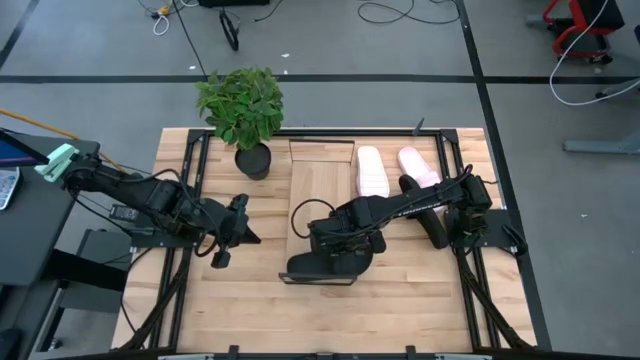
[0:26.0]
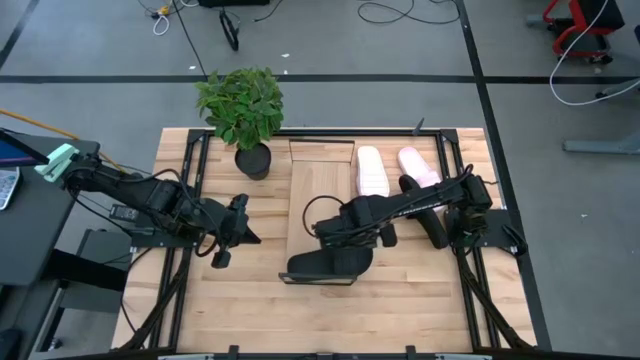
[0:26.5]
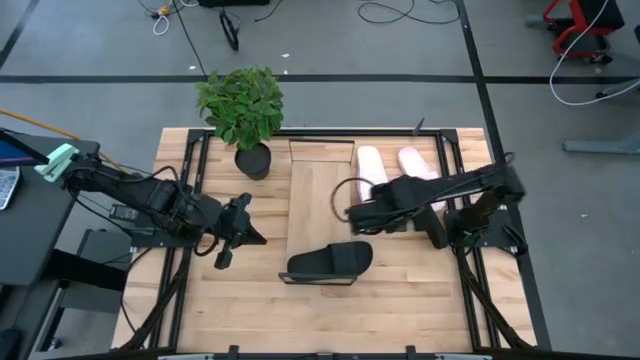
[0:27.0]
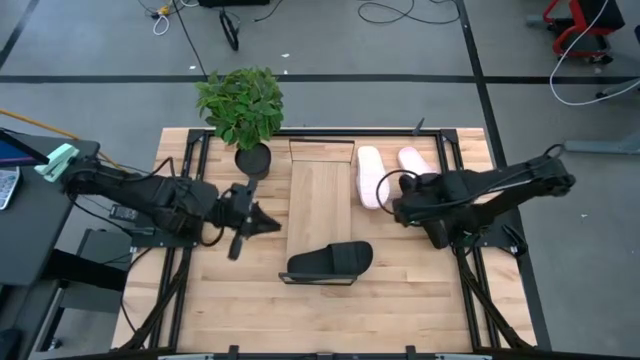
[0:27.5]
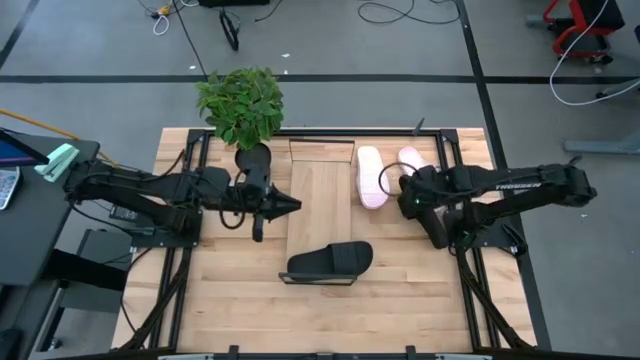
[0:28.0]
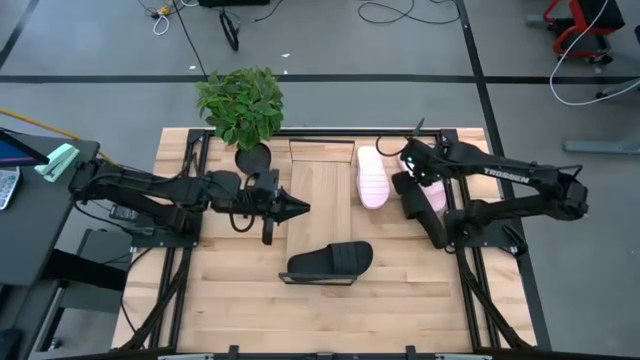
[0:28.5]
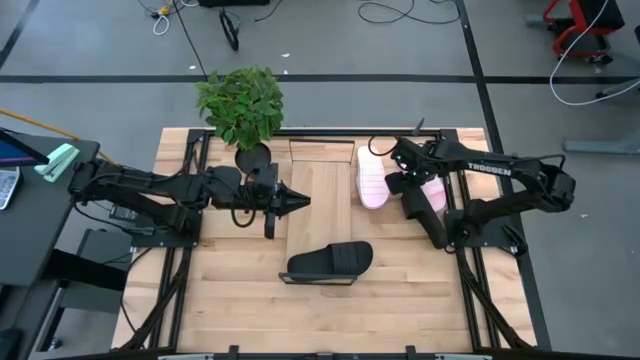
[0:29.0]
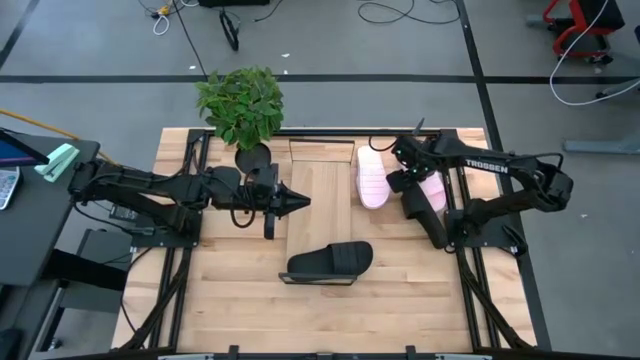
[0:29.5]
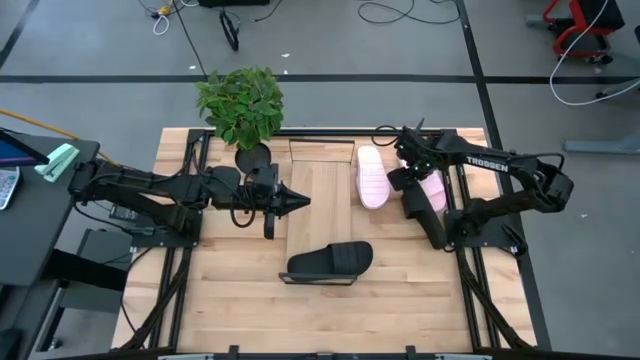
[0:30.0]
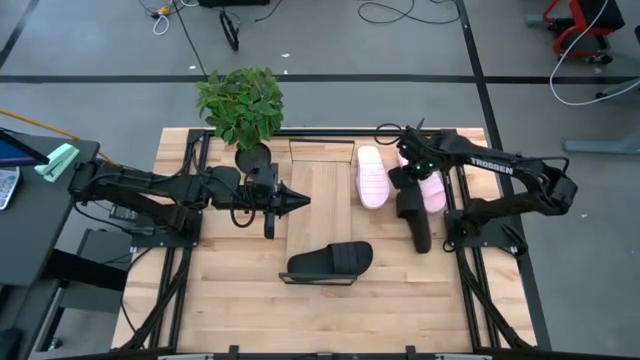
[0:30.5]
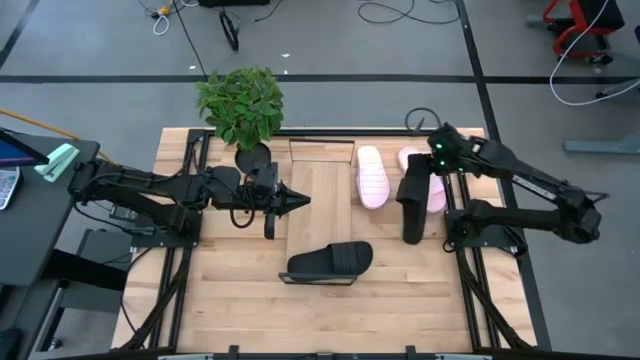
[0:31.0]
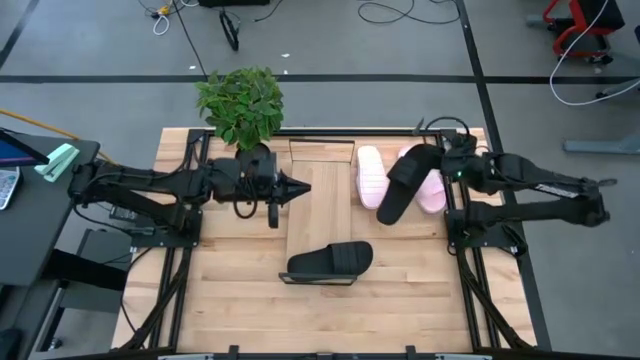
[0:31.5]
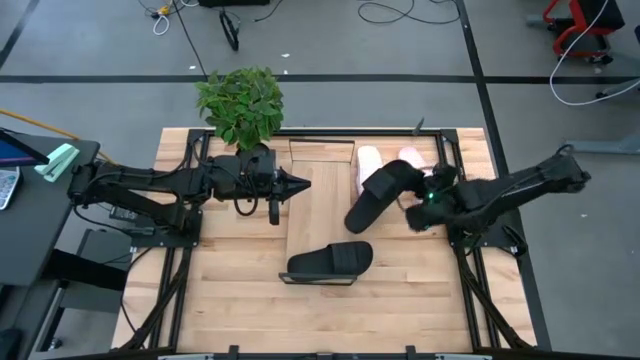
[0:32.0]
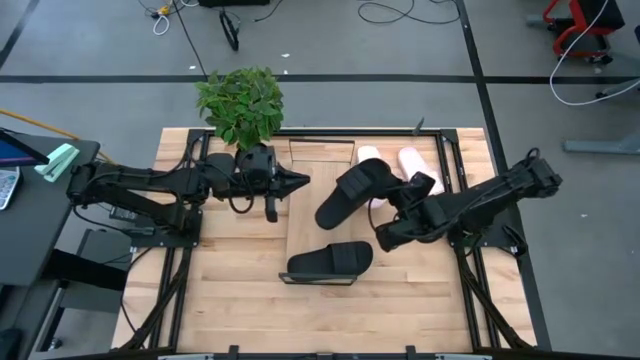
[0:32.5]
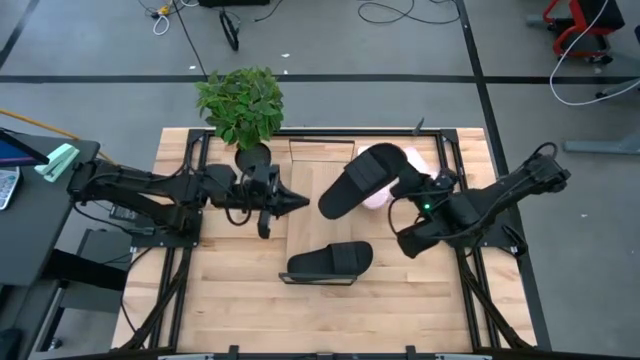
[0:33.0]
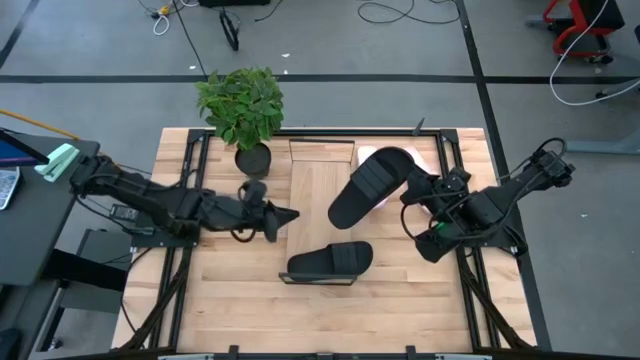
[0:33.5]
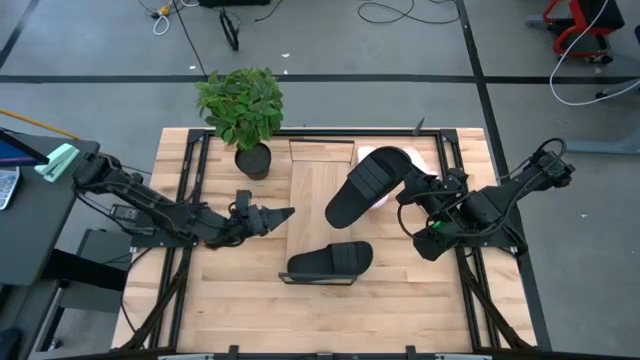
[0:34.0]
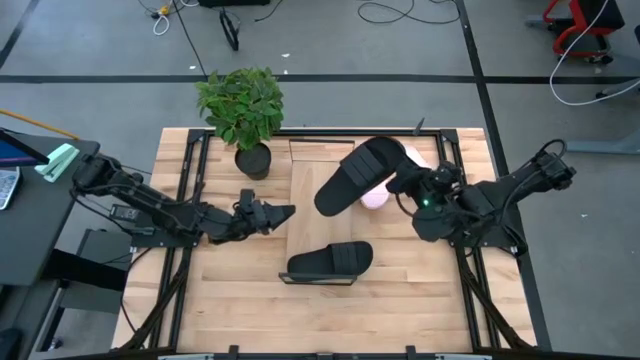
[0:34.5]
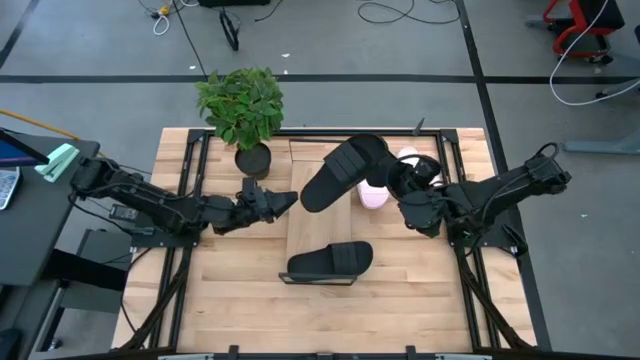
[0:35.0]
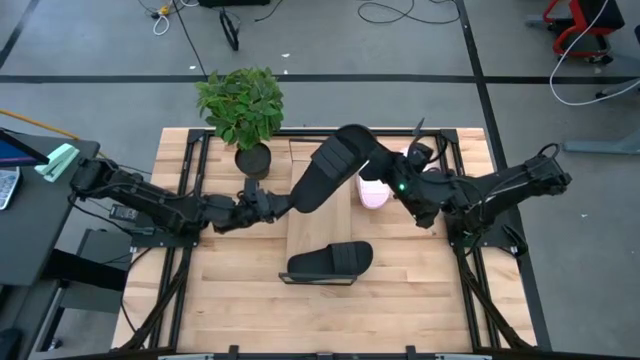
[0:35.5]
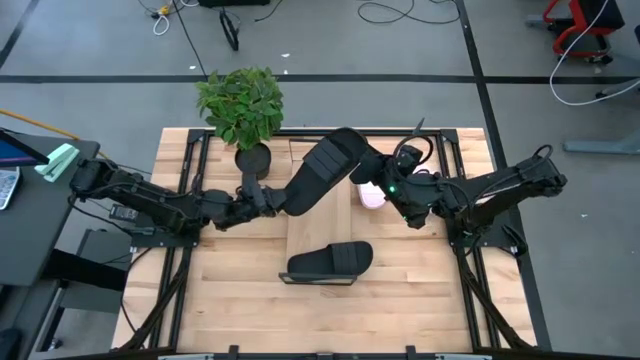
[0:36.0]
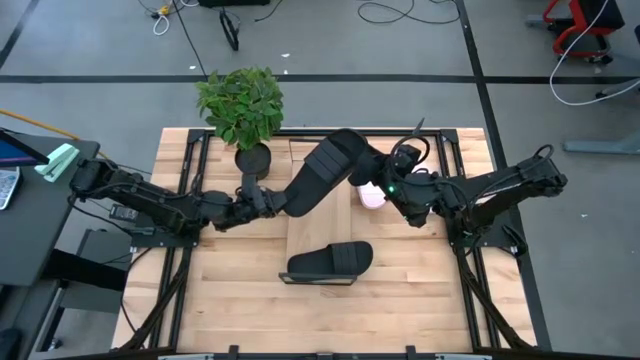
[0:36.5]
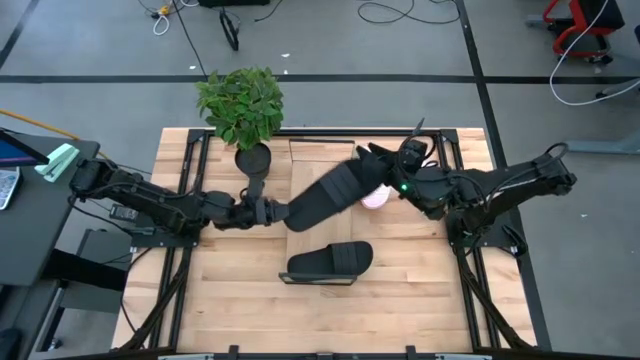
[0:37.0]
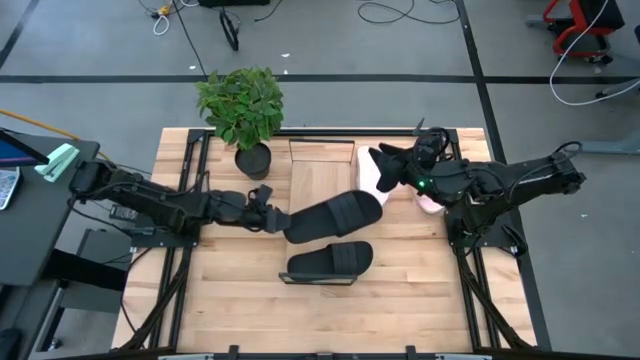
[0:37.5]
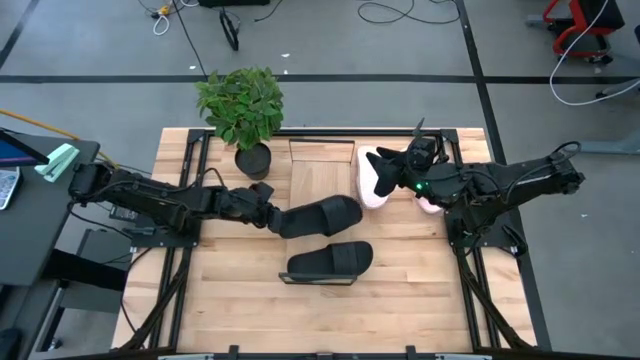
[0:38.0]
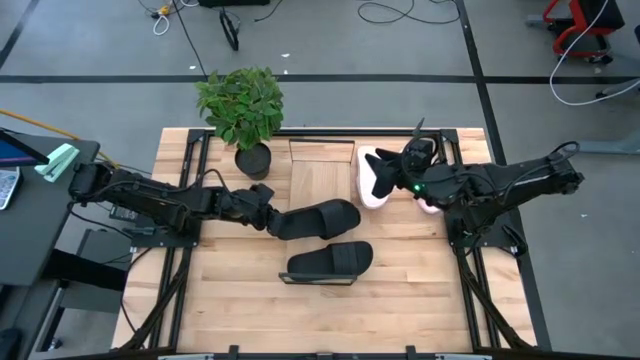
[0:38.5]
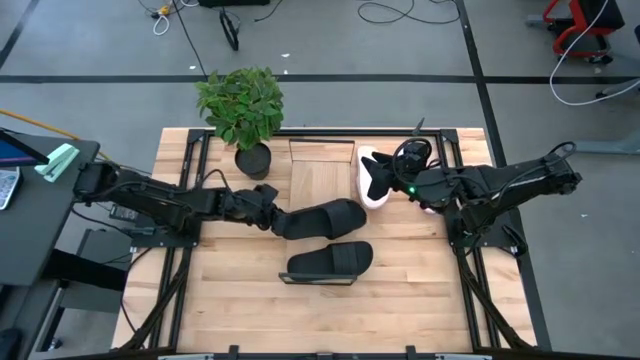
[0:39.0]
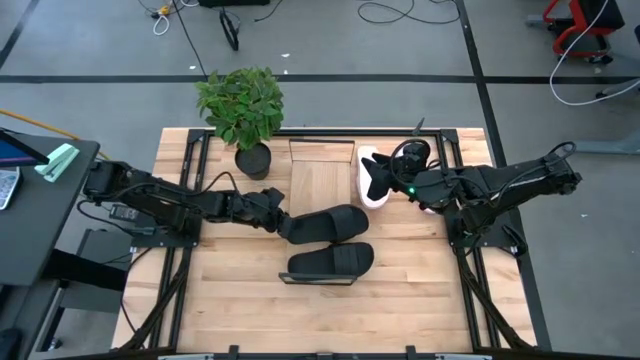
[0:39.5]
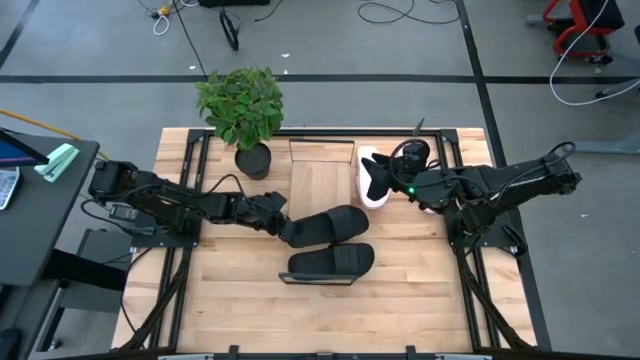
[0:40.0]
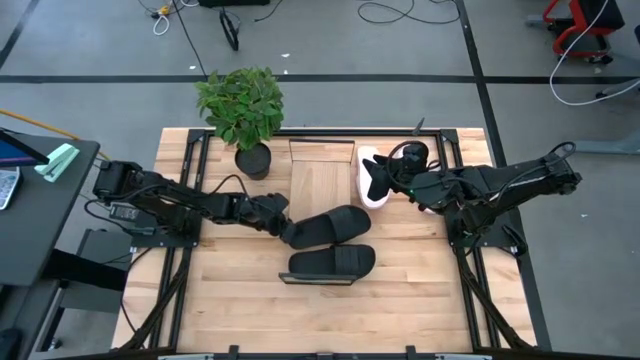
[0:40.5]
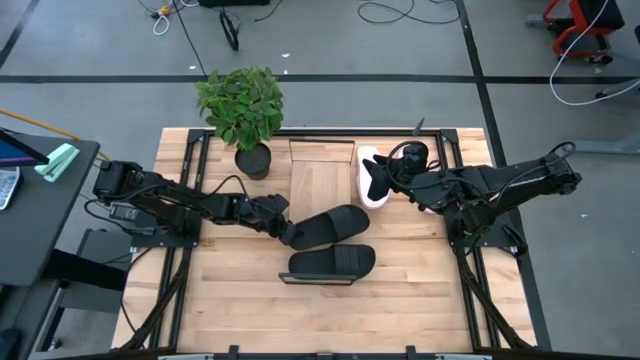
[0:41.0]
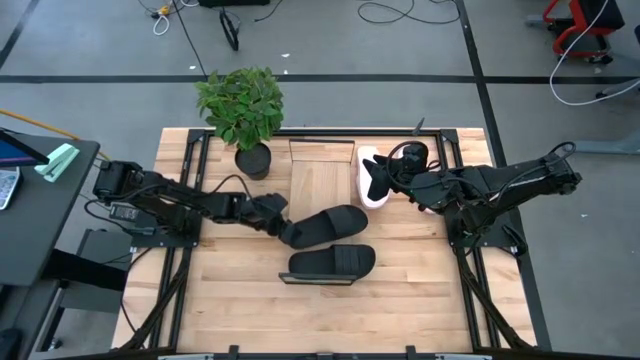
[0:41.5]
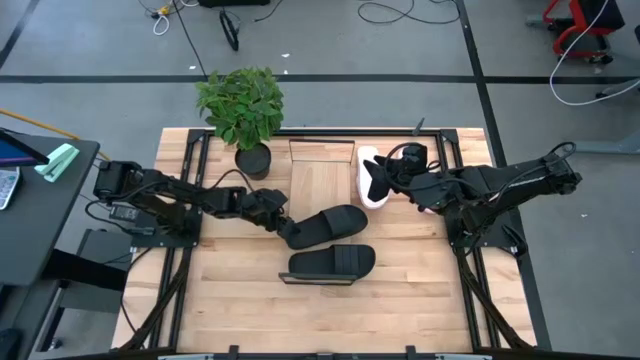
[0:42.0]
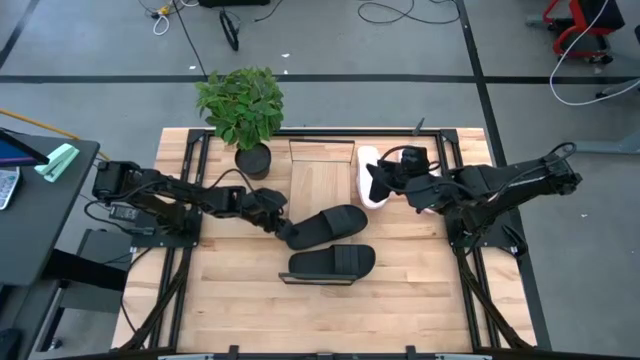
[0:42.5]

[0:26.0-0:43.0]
Task: Pick and place slides into the shelf
Put the black slipper on the shelf

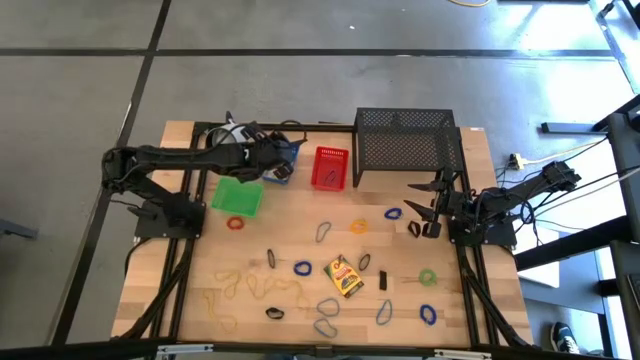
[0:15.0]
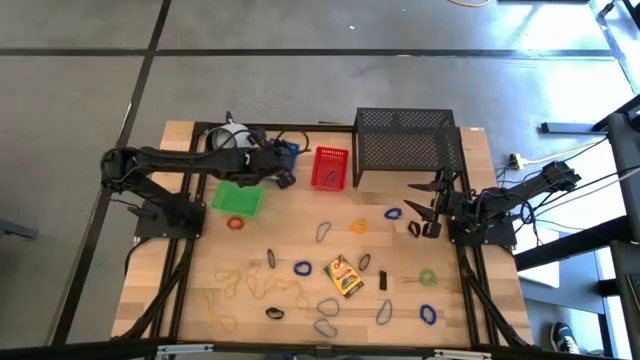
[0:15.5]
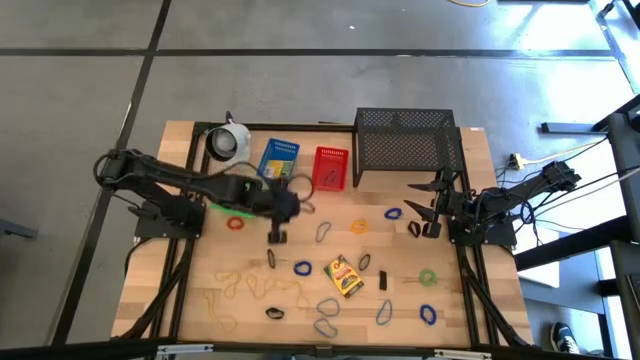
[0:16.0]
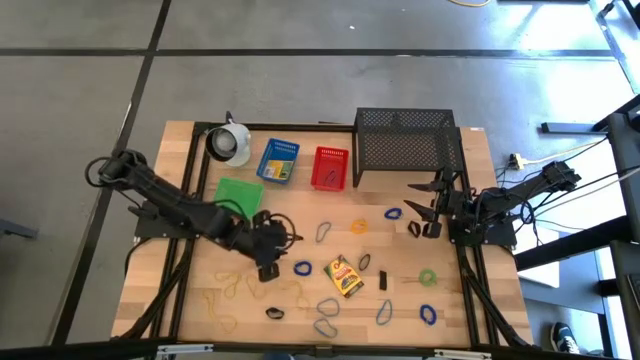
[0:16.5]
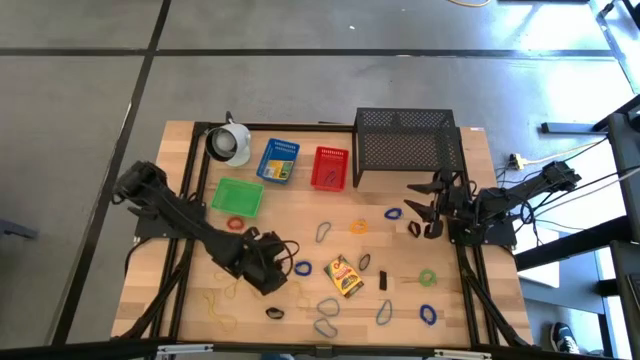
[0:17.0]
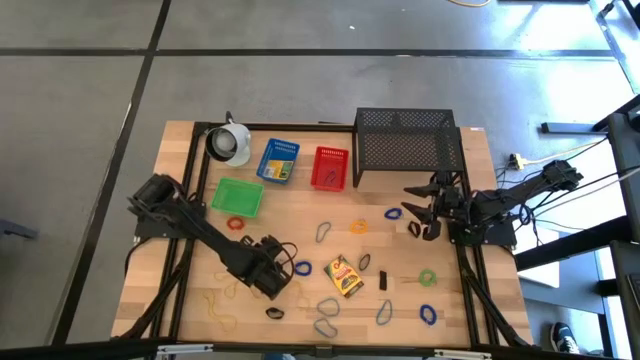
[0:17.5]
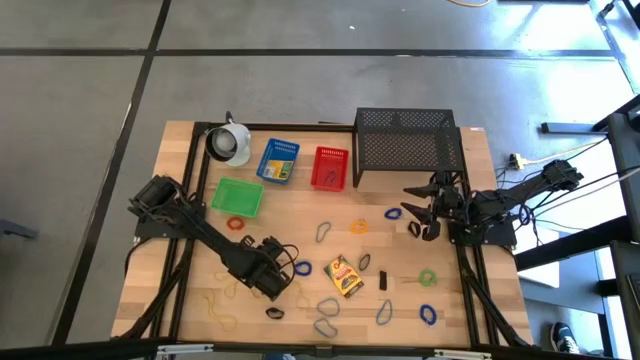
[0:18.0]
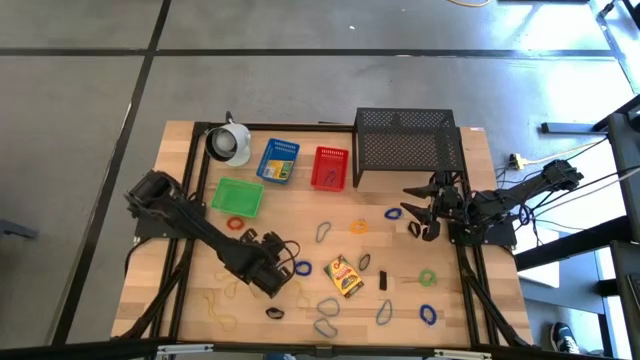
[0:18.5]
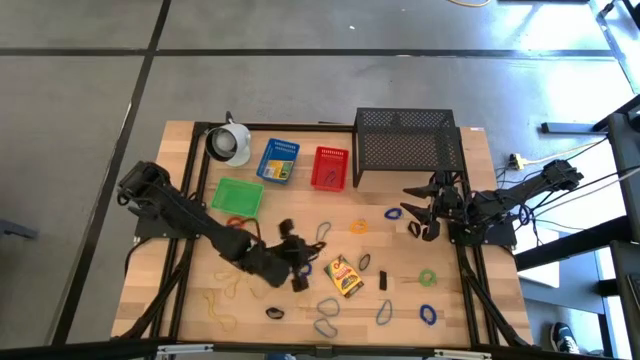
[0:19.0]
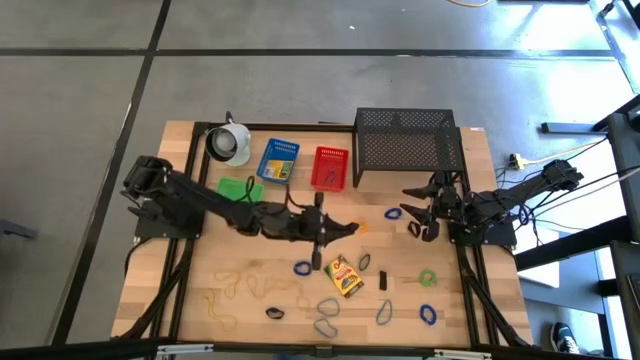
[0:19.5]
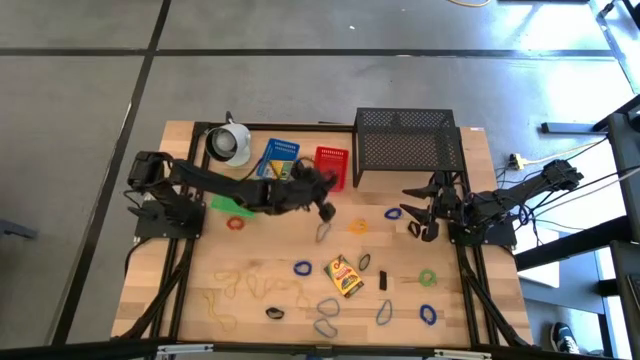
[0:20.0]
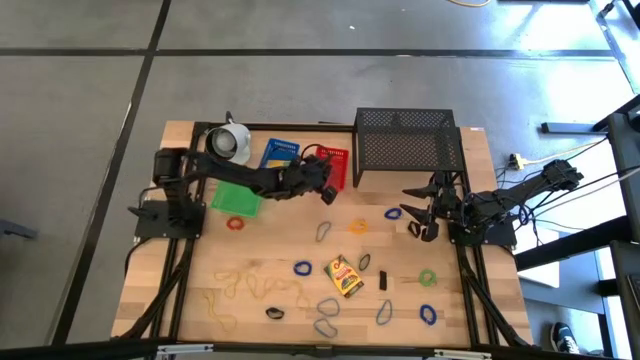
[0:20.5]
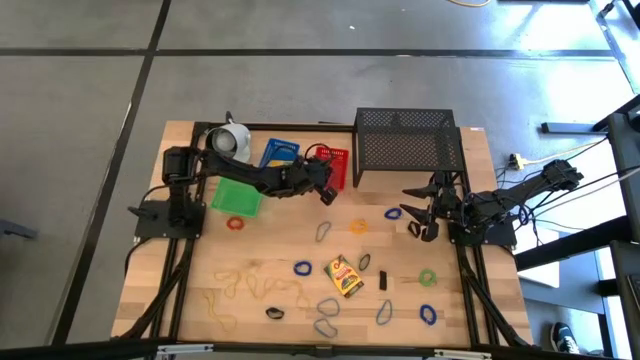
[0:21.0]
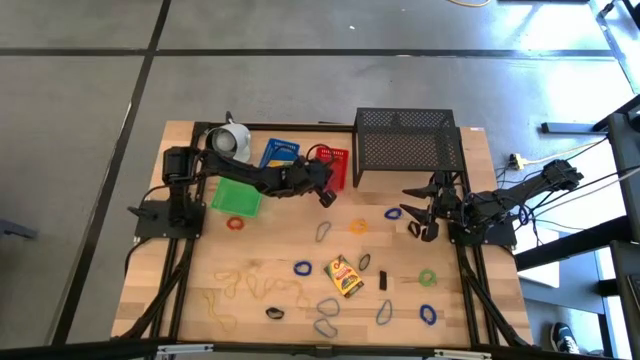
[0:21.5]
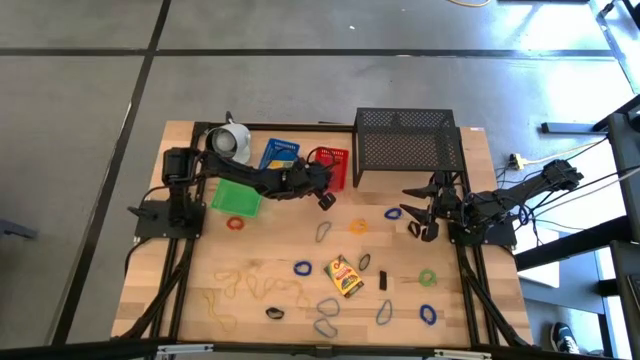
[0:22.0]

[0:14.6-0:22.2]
Task: Pick & Place Office Desk Supplies
Put the black rubber band into the red bin
